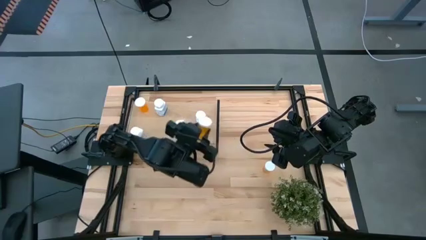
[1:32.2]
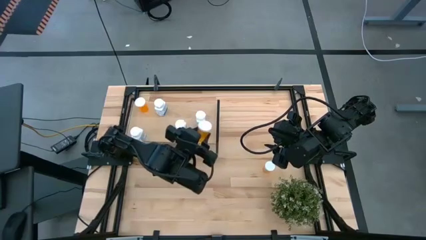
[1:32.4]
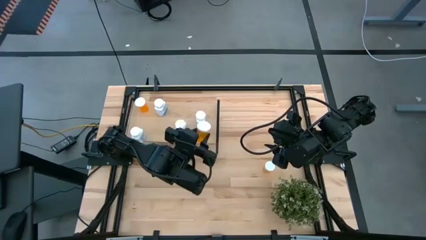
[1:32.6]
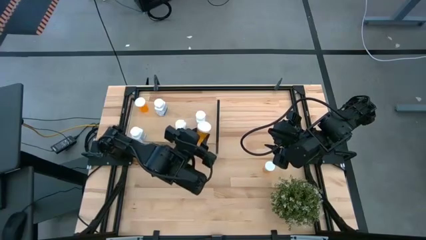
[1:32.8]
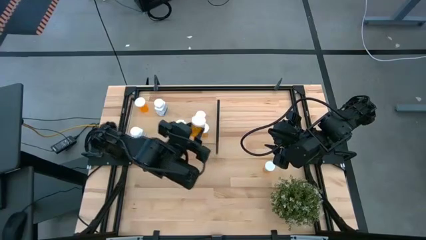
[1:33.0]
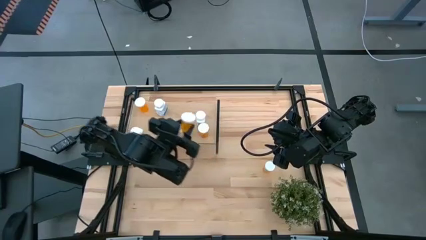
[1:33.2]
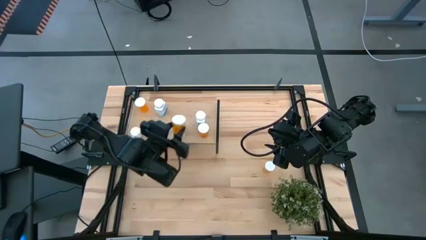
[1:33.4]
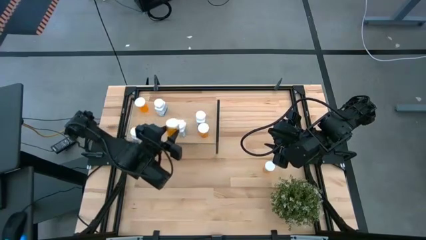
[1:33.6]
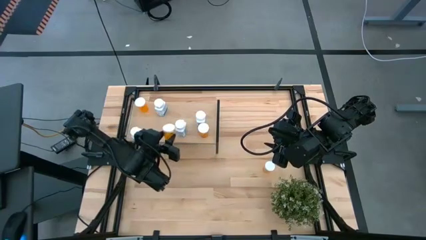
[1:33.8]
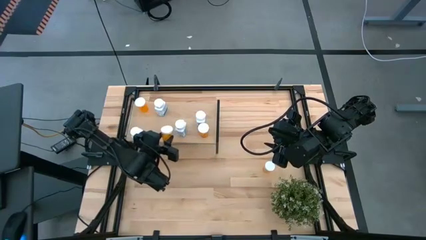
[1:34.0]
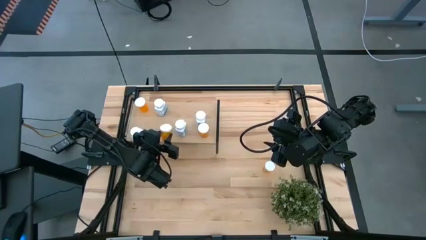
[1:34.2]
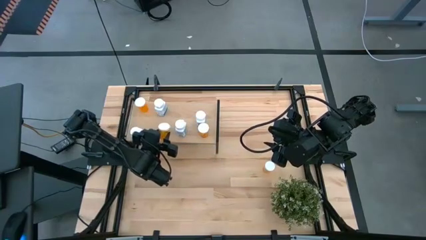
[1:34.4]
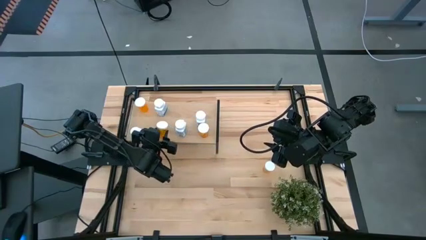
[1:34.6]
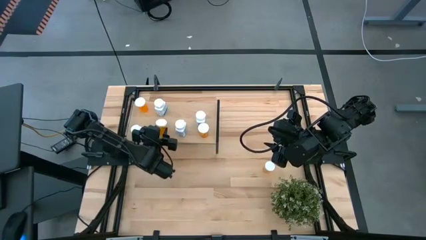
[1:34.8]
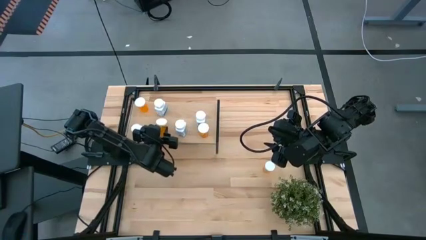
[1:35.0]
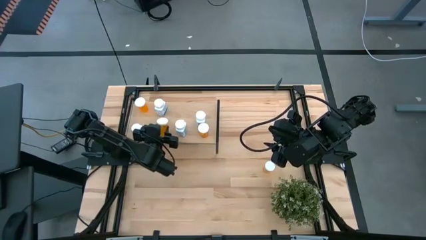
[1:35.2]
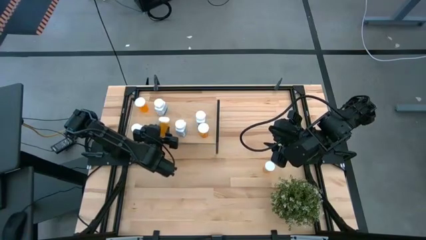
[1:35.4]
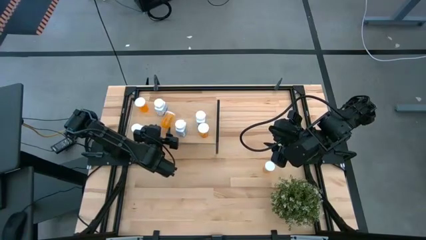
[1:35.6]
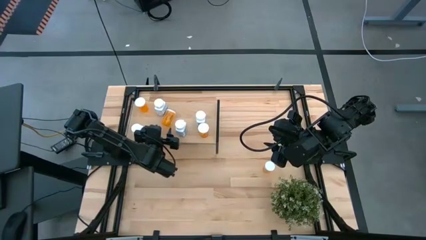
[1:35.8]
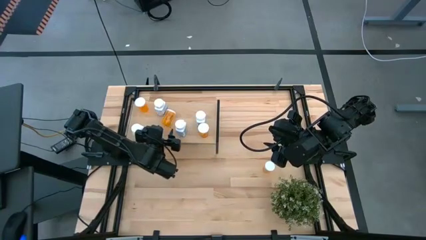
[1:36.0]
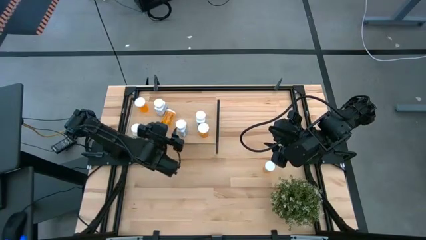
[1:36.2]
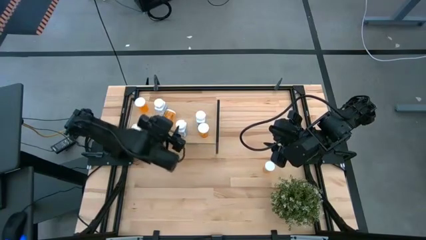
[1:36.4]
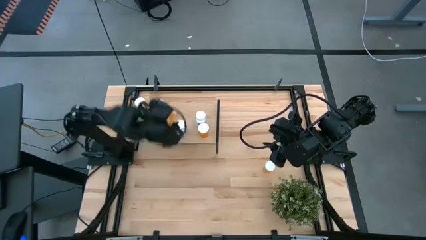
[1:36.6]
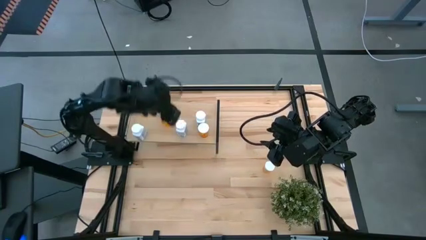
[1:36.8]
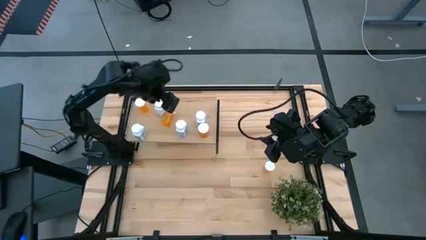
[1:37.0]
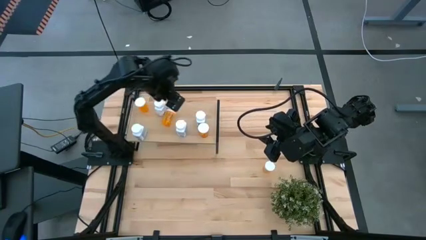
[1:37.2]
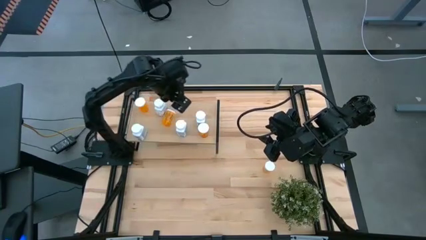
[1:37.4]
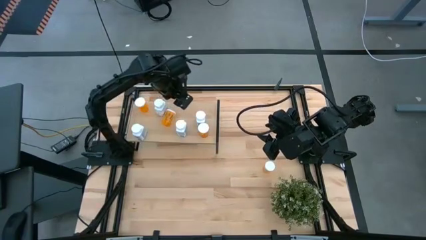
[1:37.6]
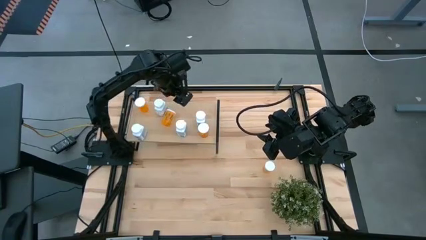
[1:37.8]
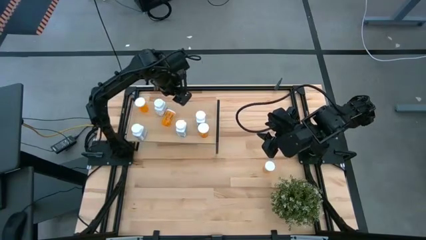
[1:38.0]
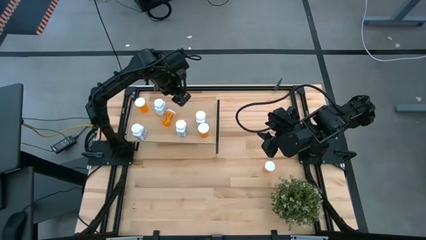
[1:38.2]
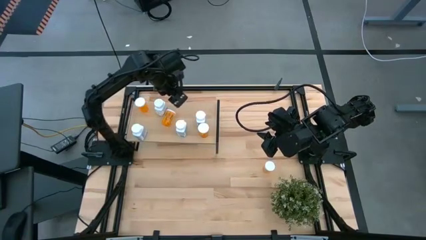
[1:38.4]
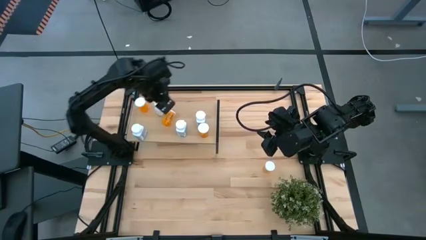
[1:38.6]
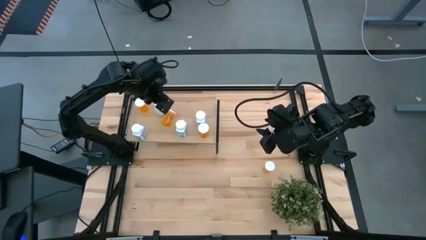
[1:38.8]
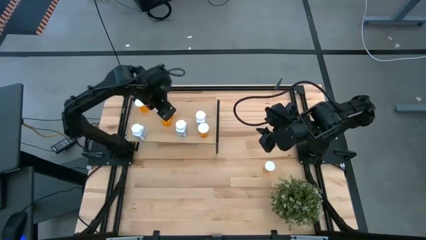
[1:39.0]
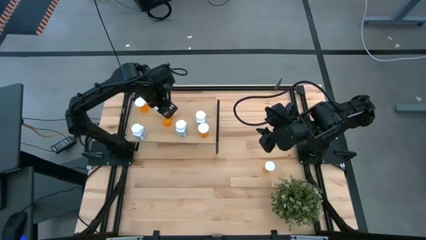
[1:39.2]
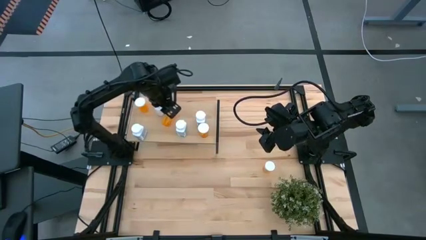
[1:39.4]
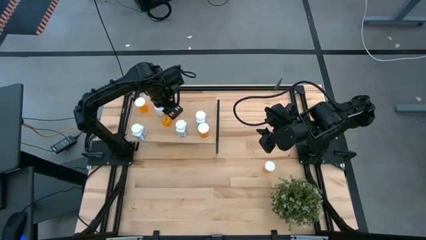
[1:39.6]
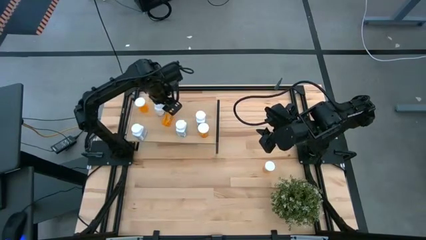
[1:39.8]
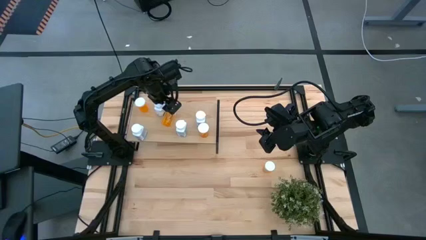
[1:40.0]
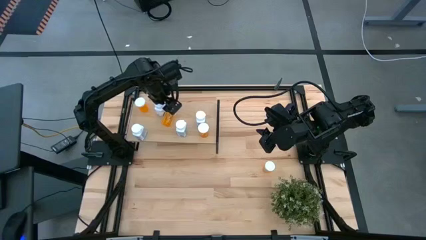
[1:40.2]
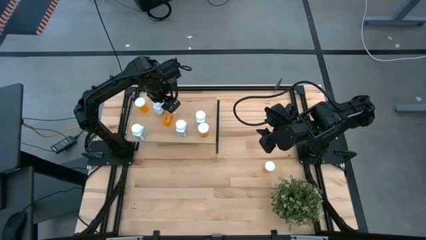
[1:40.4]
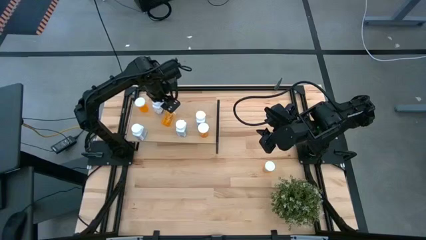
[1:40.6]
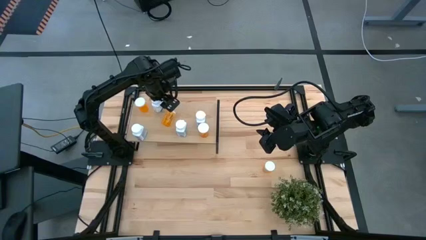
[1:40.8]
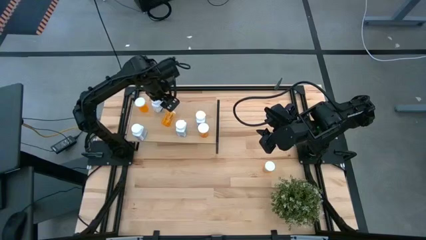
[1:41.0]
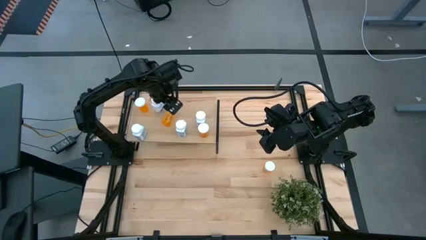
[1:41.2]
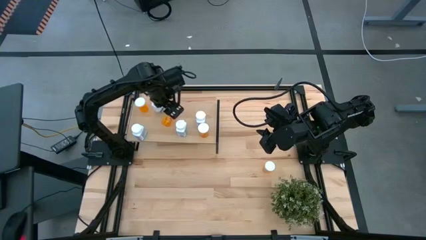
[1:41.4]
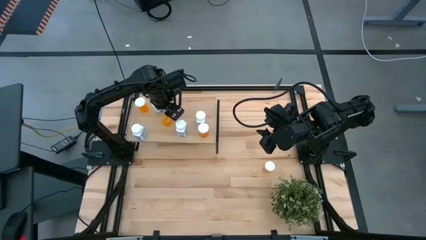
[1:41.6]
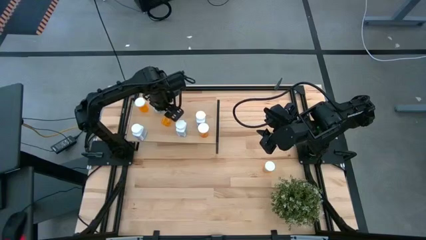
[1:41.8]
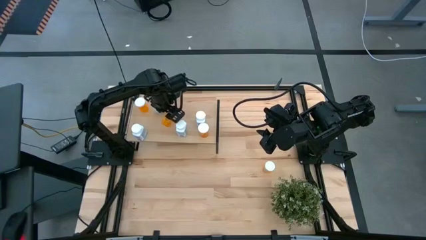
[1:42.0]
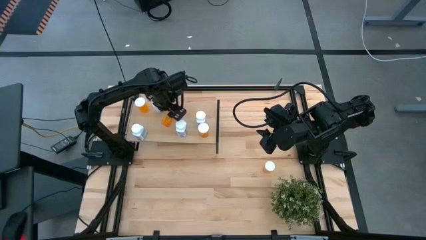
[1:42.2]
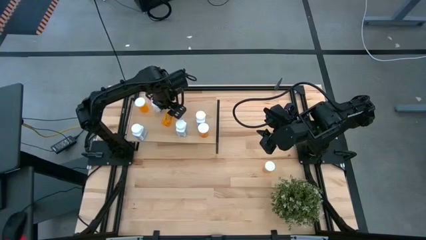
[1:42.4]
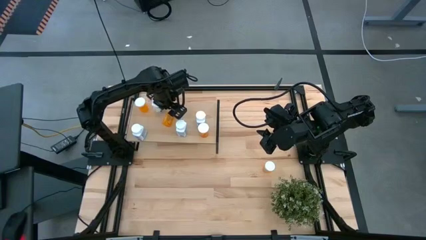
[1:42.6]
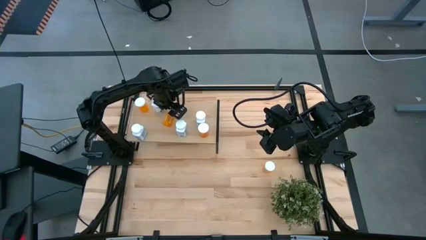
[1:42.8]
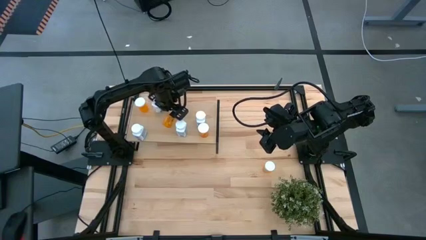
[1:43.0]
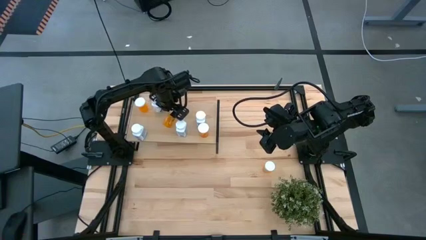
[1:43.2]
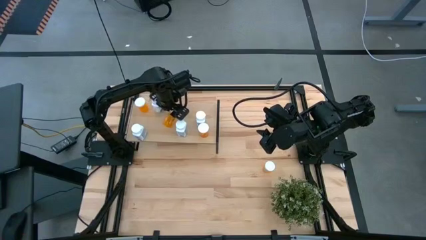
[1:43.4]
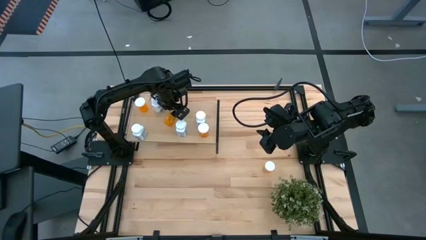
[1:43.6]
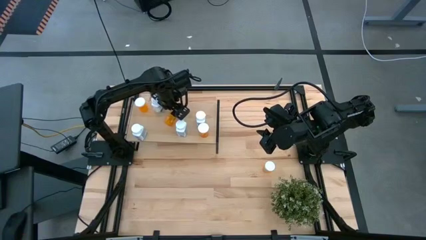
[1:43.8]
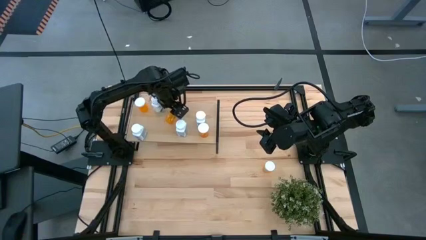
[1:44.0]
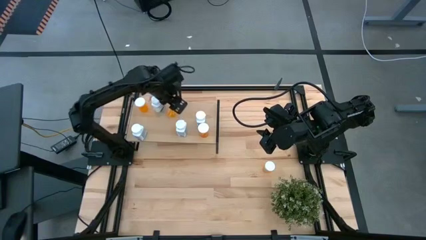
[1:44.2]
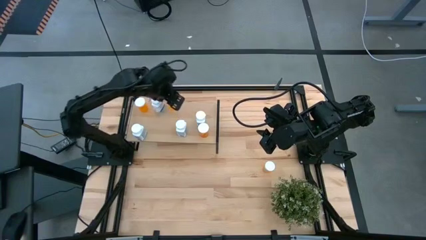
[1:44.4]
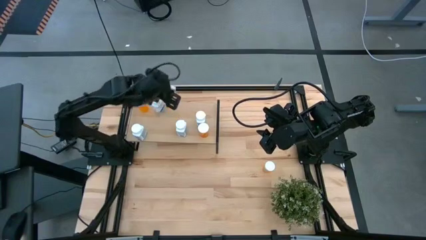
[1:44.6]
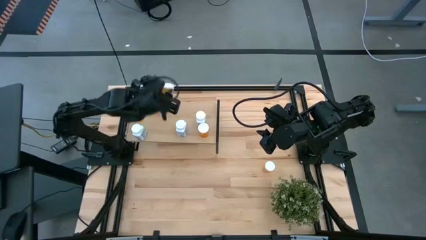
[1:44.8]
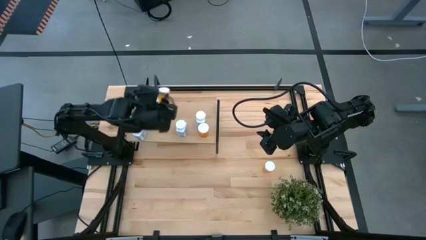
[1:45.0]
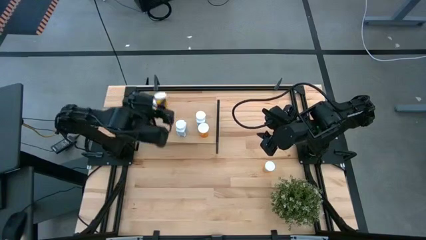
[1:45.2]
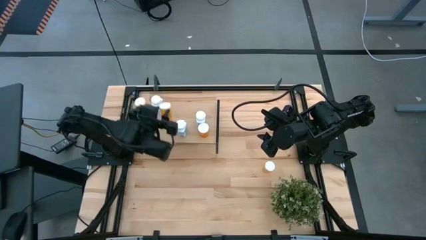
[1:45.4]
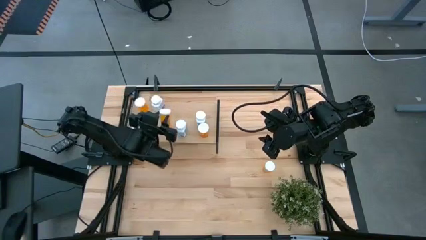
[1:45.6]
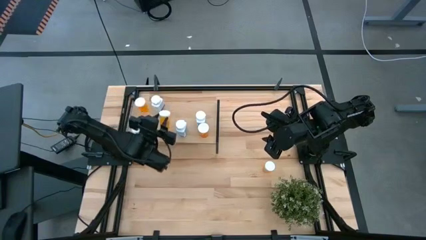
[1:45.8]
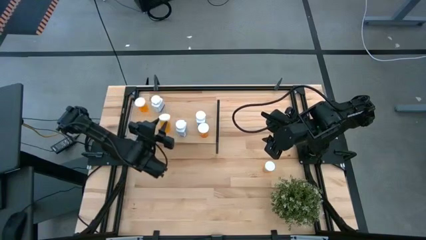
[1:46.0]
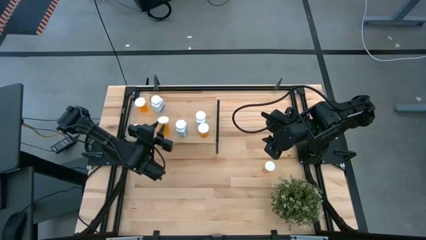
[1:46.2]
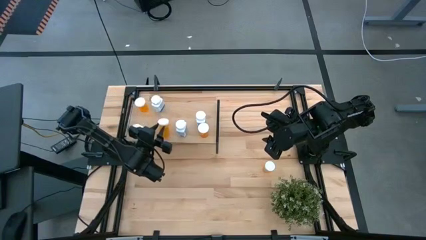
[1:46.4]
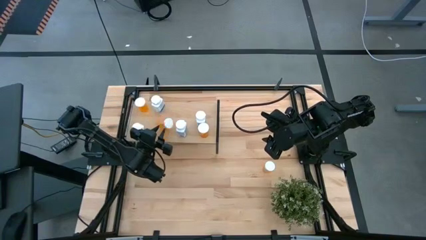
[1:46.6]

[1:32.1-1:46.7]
Task: Pick and place medicine bottles onto shelf by color
Put the orange pill bottle on the shelf

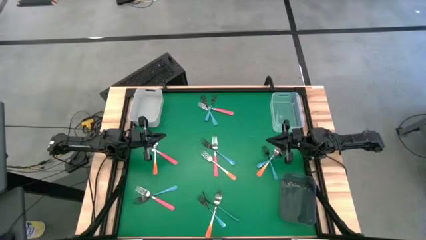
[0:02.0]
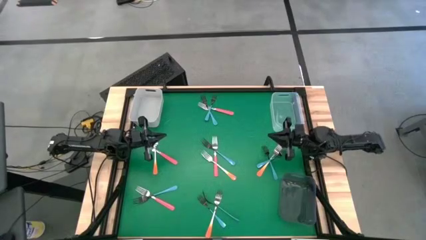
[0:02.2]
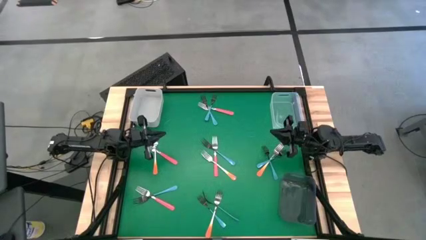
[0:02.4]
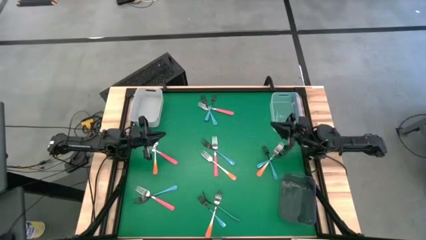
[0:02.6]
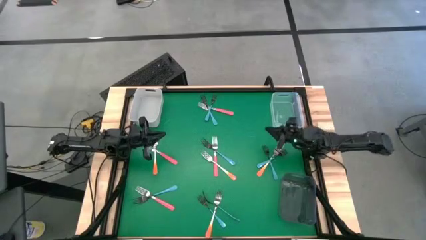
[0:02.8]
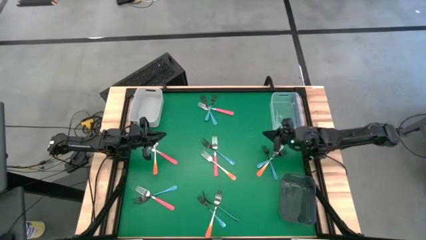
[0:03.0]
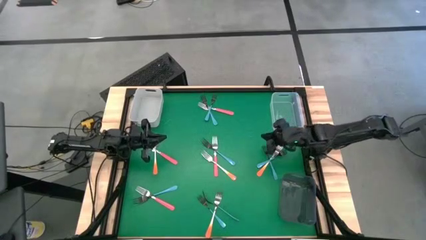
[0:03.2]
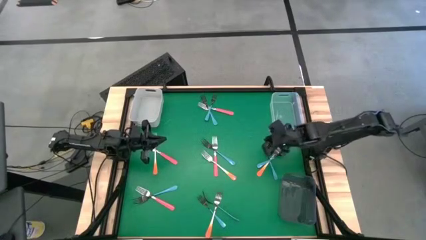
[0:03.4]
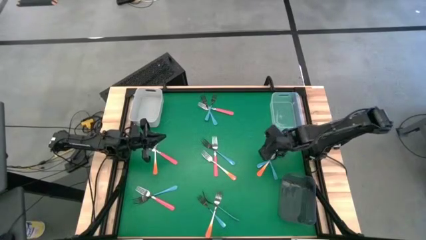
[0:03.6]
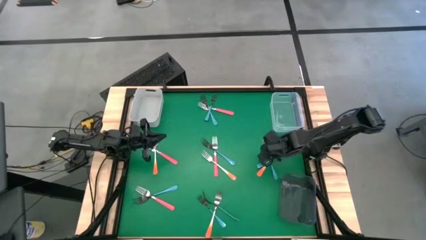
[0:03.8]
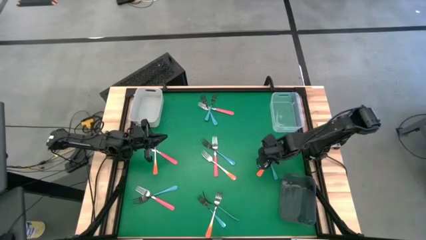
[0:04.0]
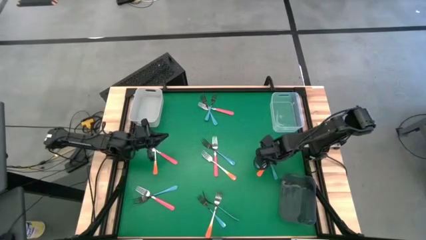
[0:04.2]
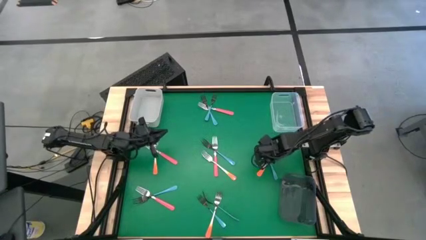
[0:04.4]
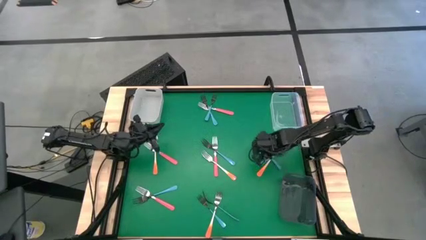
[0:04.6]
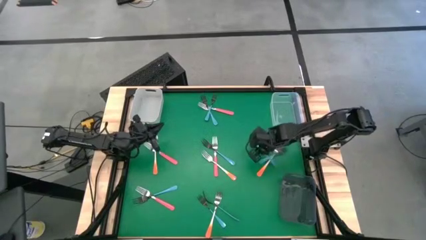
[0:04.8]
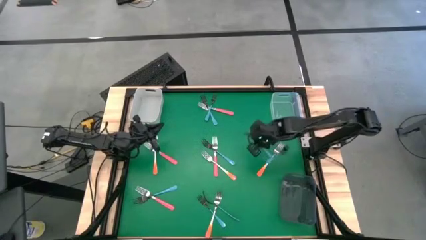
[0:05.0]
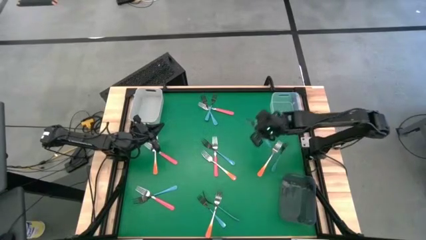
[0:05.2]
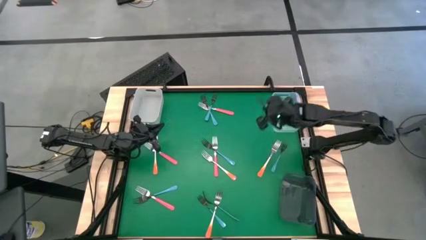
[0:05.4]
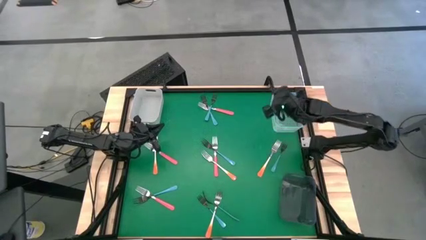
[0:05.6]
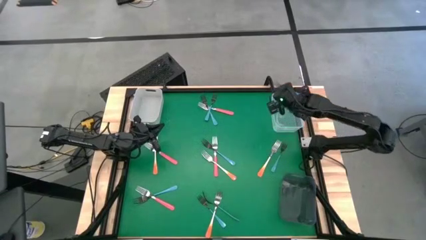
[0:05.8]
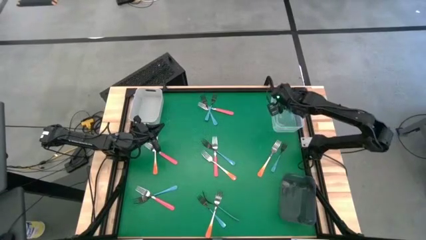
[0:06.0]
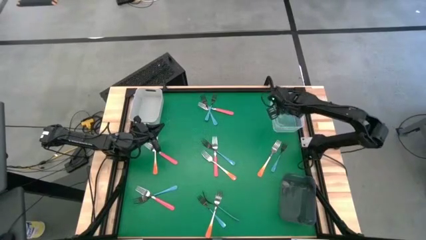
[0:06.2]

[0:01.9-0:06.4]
Task: Sort silverware by color (type)
Put the blue fork into the transparent bin
